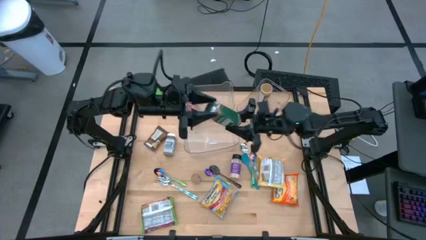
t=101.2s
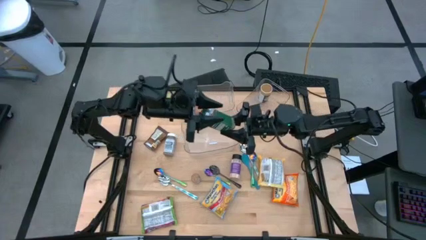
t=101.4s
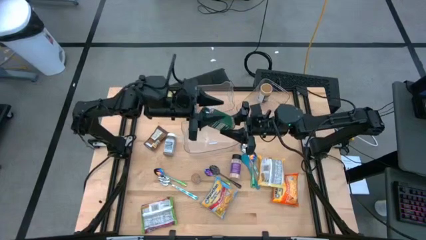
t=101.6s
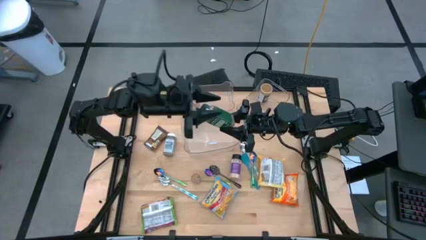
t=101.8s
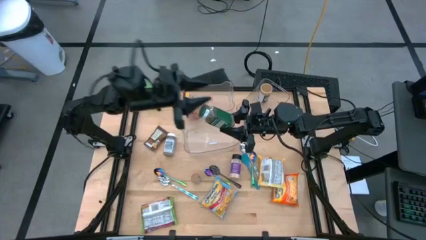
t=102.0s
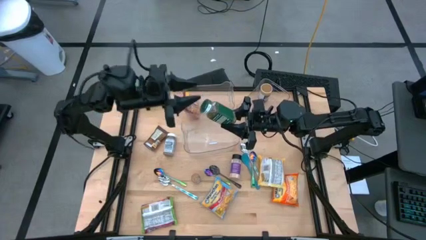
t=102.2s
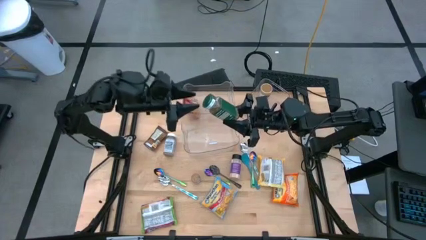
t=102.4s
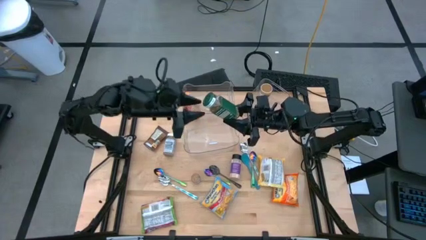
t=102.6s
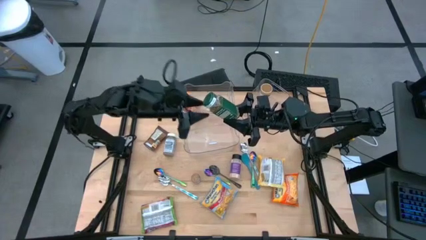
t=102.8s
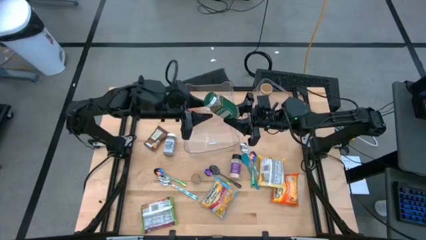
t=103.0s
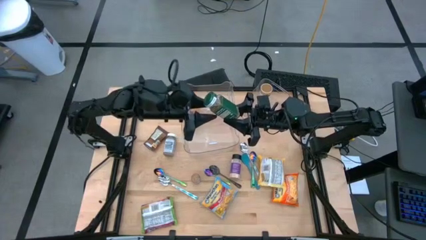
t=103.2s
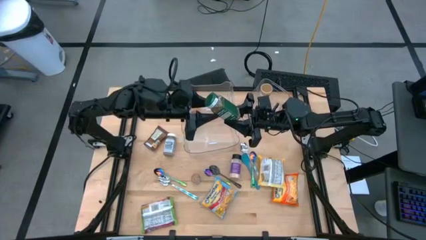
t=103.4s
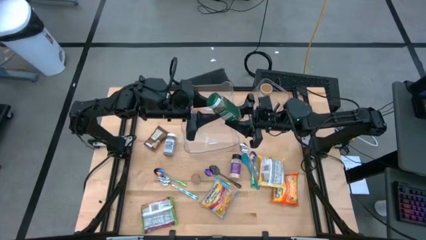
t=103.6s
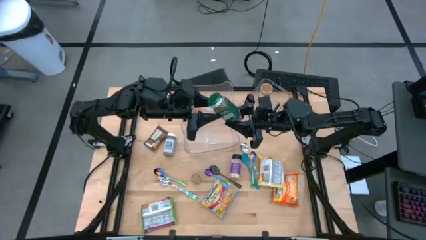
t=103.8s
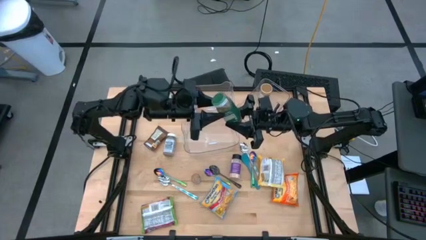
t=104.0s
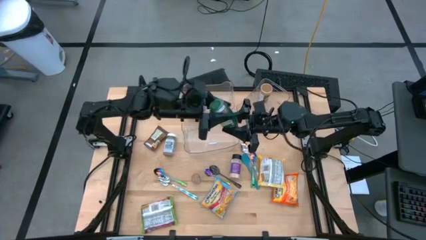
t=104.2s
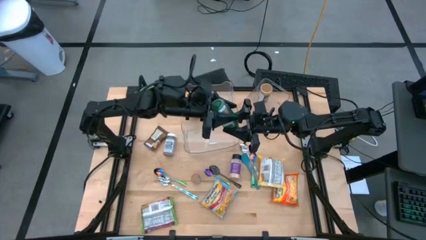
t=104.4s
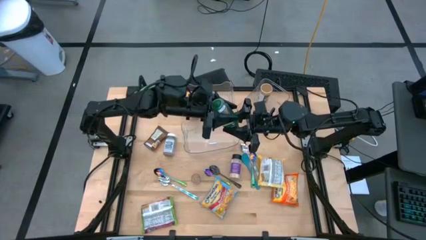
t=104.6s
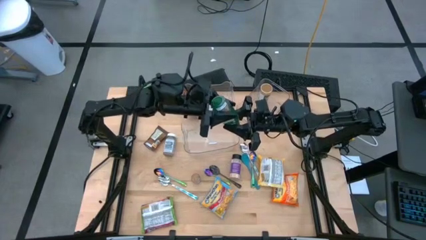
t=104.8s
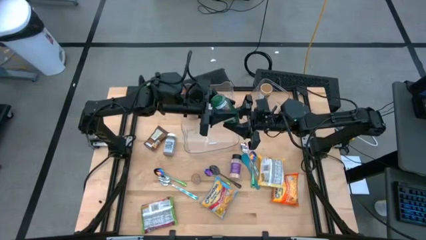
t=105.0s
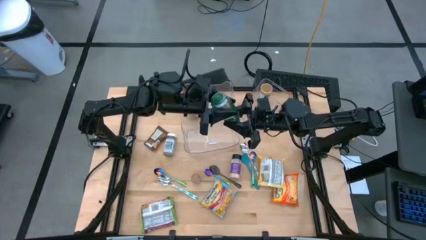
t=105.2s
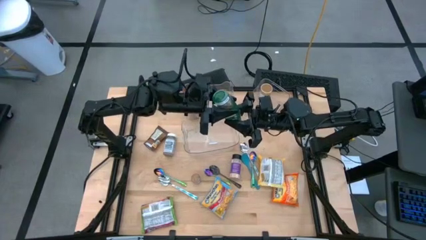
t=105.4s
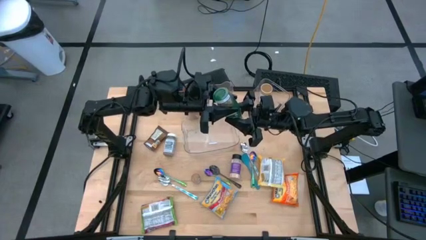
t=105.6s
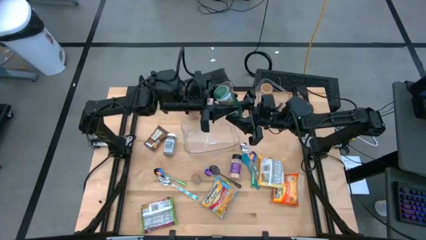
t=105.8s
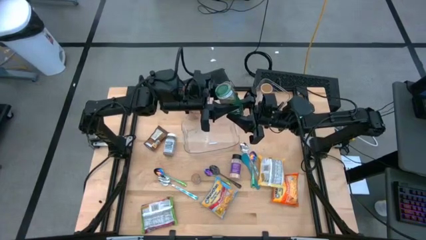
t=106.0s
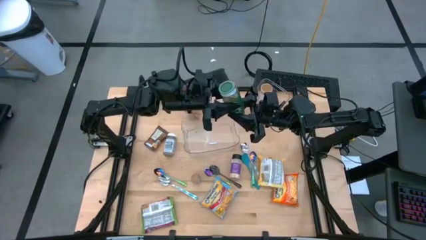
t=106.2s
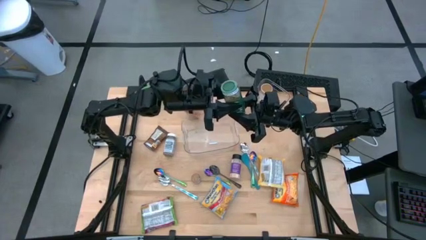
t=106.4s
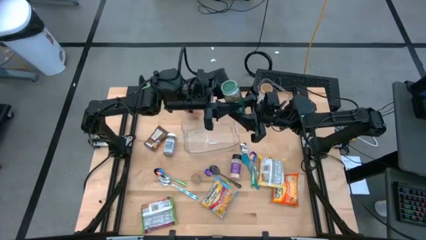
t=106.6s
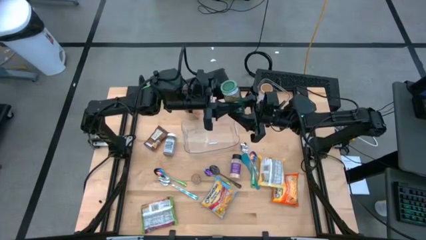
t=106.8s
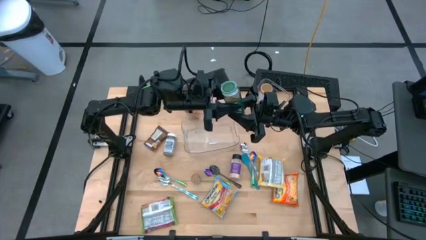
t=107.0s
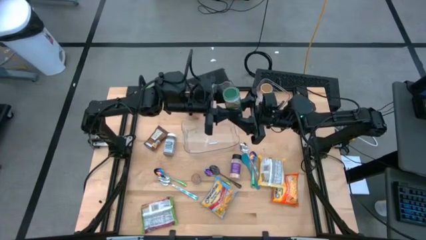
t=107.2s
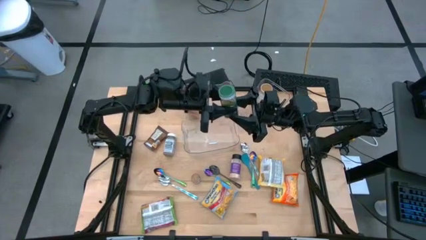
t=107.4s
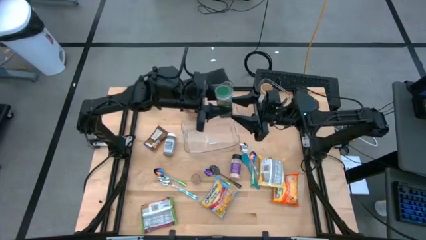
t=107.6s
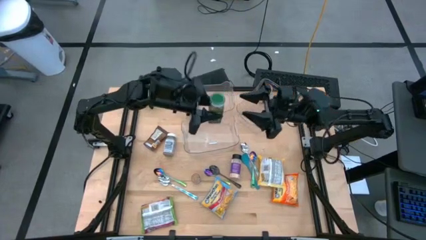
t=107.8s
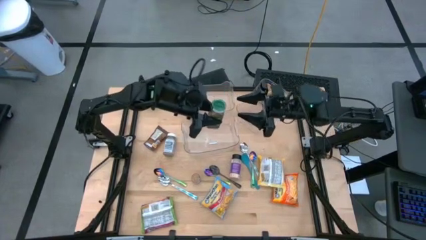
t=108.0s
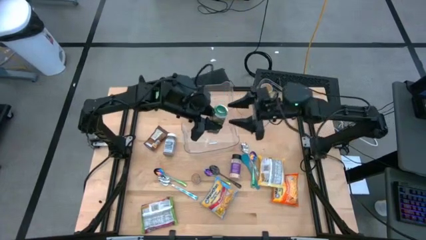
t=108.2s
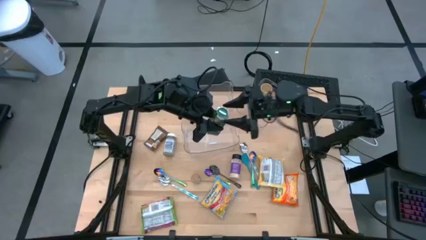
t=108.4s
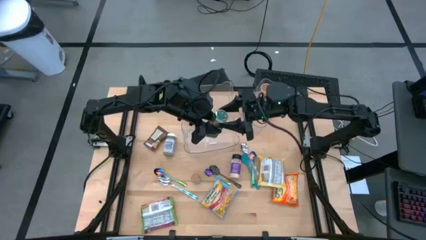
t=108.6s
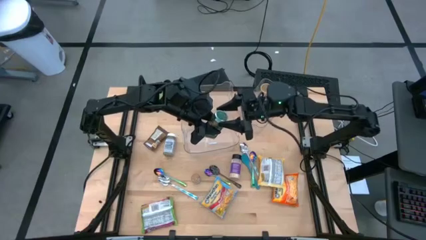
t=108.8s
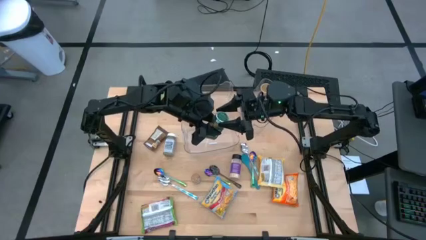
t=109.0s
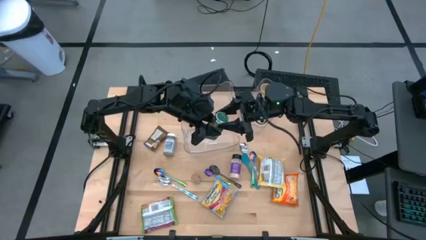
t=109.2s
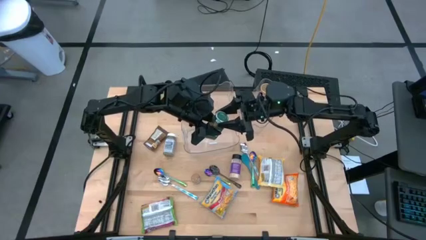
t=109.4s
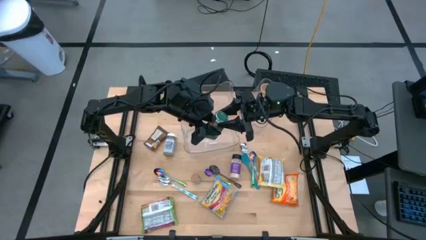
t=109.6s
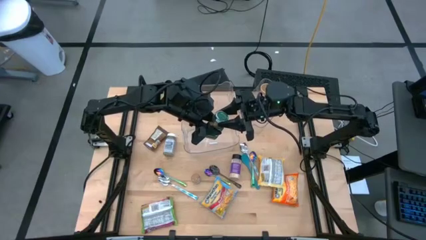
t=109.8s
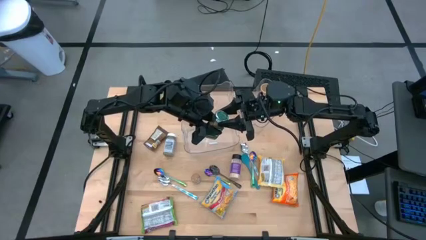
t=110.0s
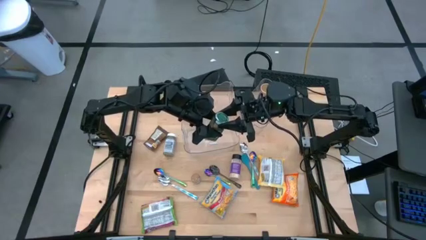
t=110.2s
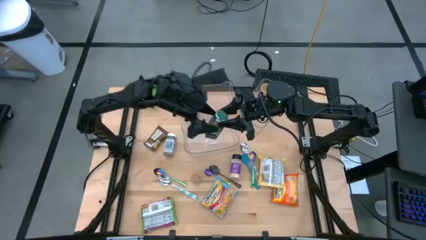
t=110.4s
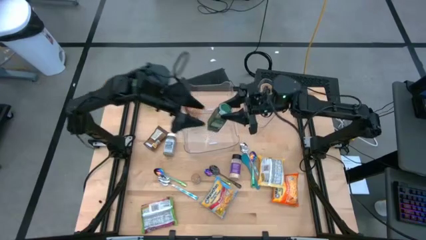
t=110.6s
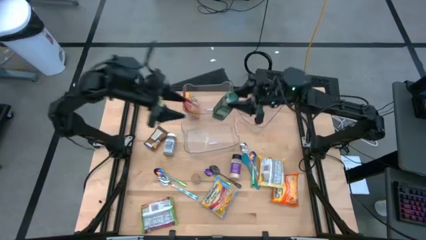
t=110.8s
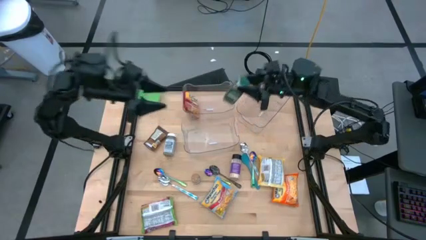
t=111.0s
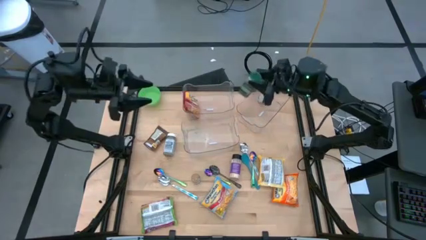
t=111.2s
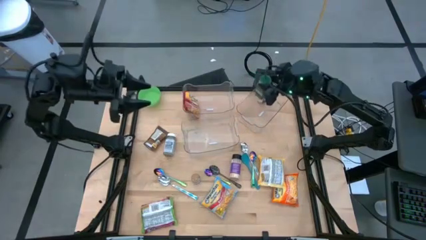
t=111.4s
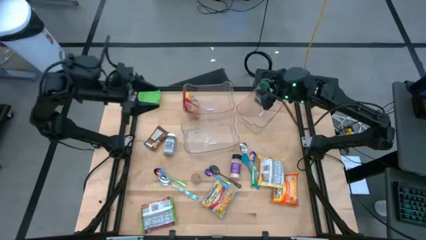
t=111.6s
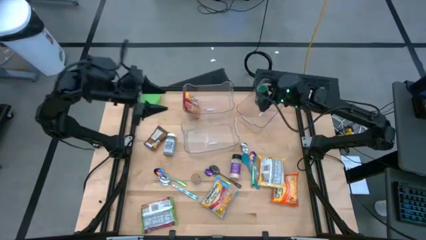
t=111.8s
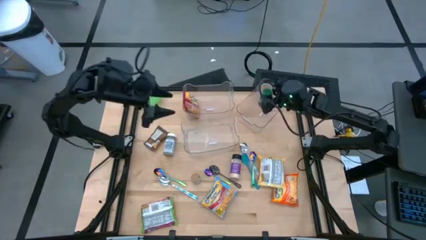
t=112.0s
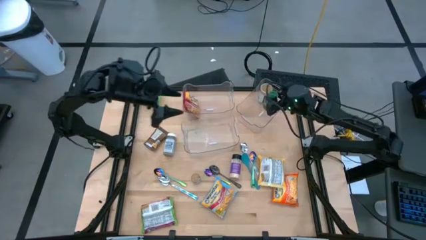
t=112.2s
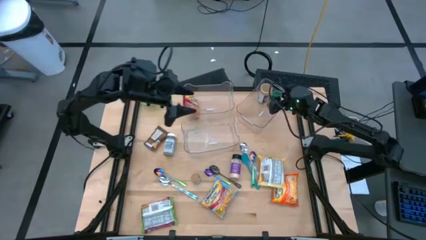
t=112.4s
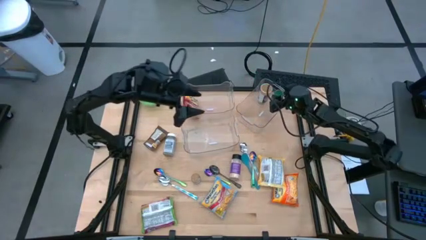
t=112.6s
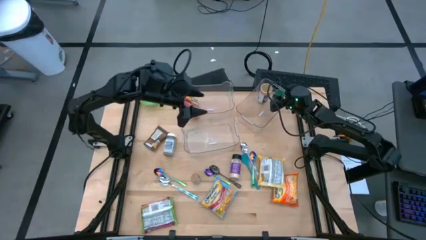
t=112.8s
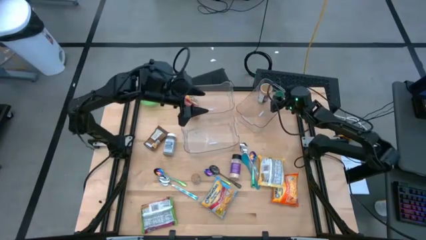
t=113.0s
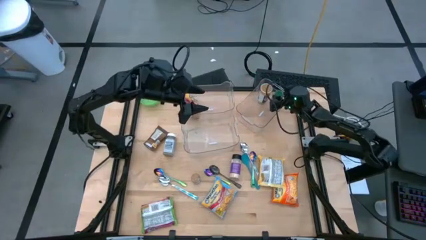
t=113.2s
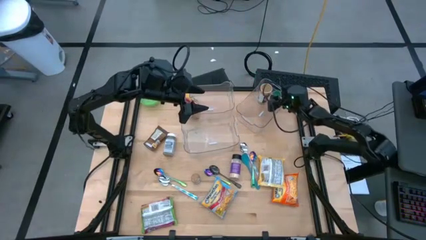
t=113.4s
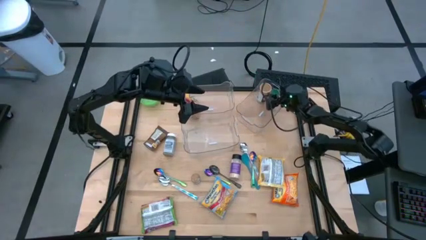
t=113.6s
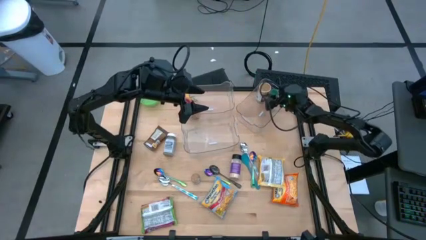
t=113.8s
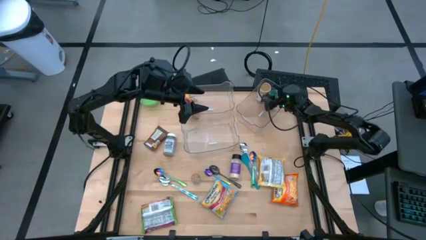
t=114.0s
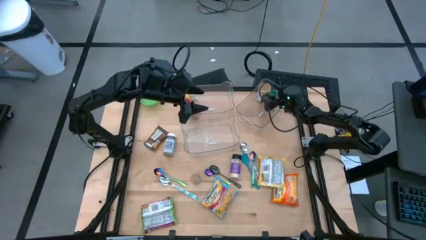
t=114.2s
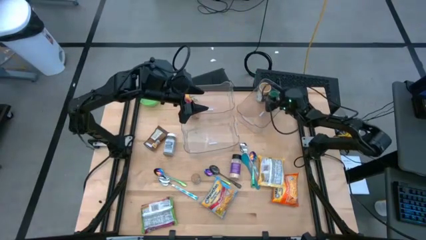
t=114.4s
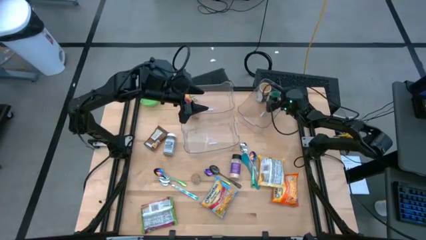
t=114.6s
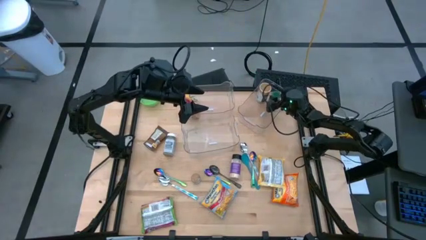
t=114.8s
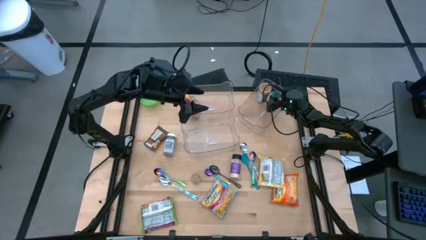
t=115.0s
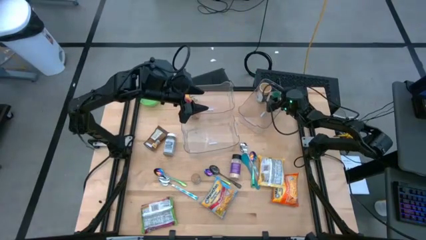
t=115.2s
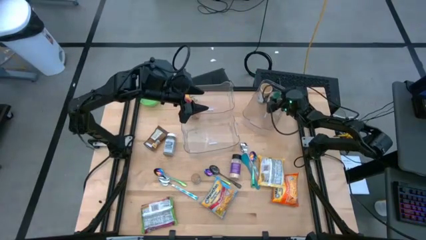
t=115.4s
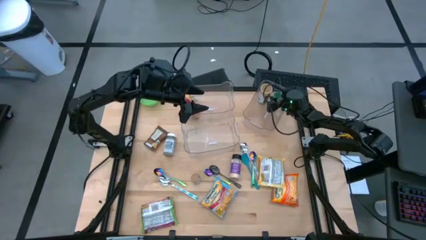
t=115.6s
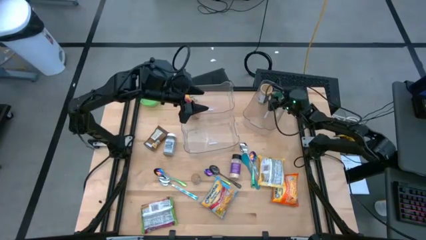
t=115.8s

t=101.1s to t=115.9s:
Task: Pick & Place Food Item
Put the green seasoning bottle into the top right transparent bin
